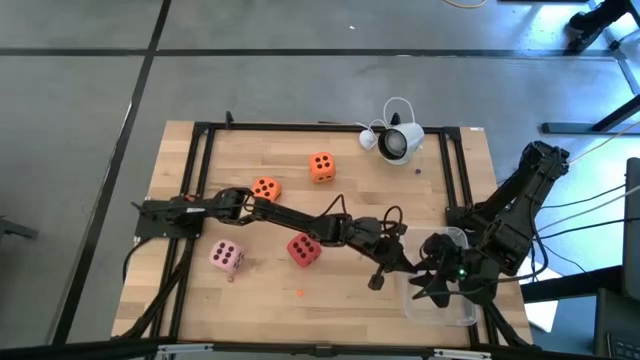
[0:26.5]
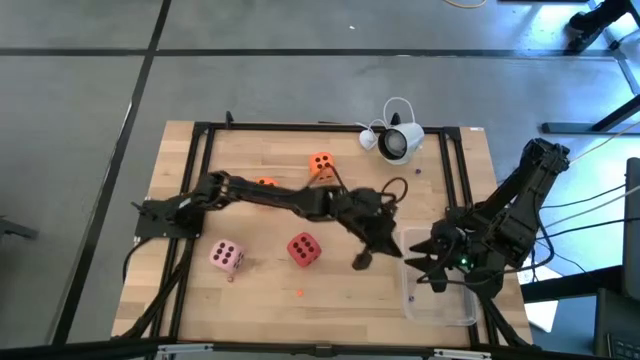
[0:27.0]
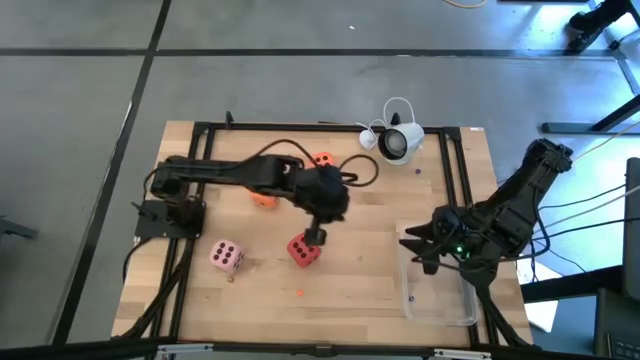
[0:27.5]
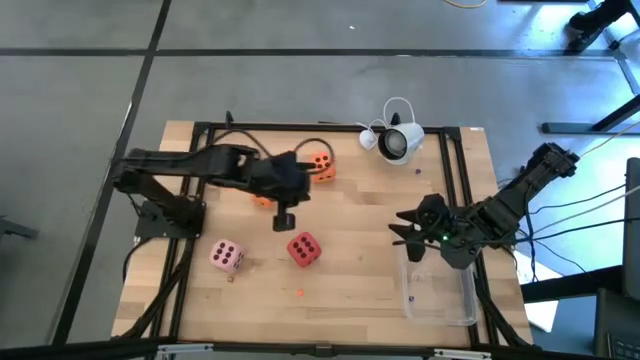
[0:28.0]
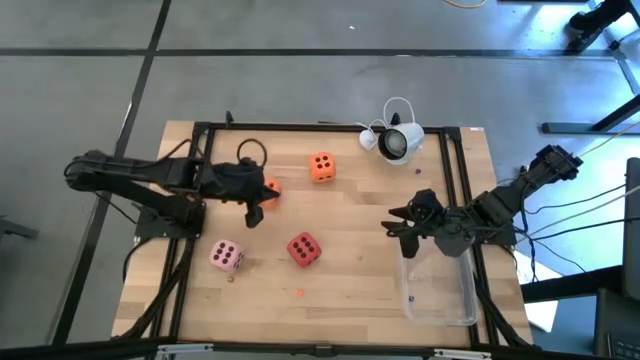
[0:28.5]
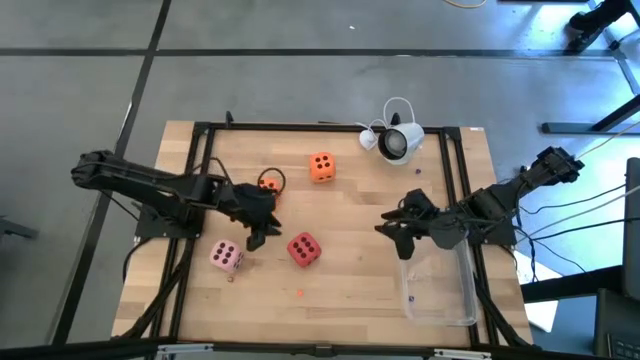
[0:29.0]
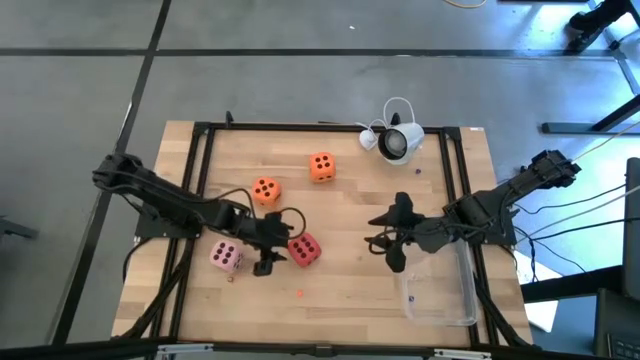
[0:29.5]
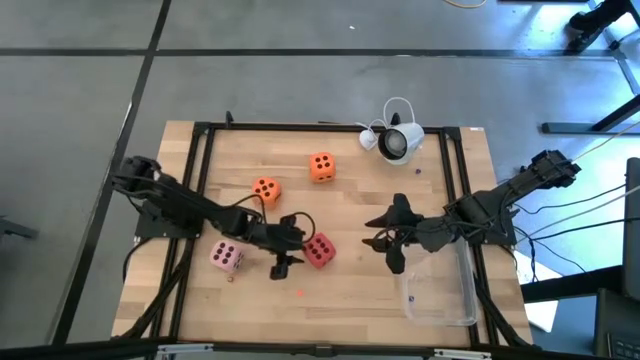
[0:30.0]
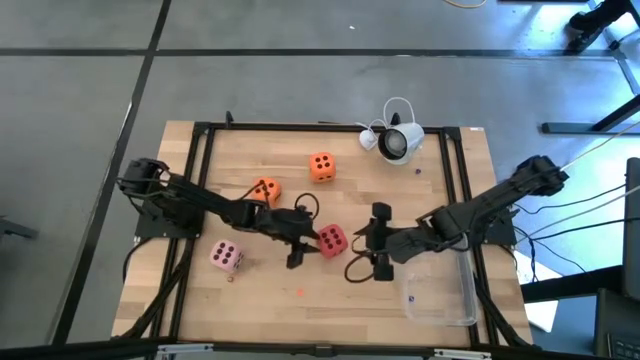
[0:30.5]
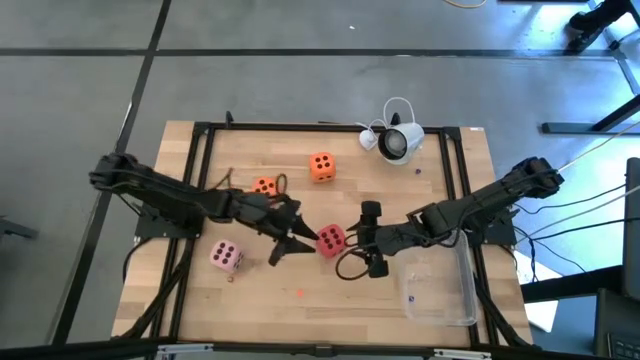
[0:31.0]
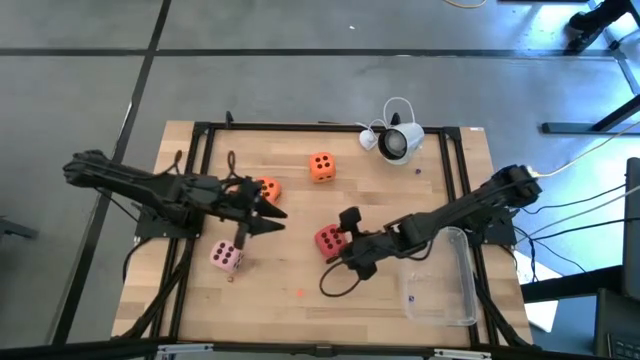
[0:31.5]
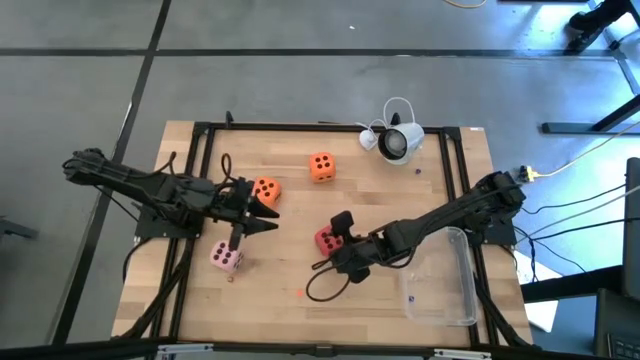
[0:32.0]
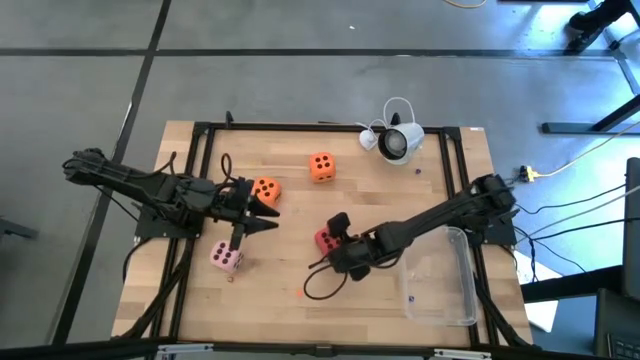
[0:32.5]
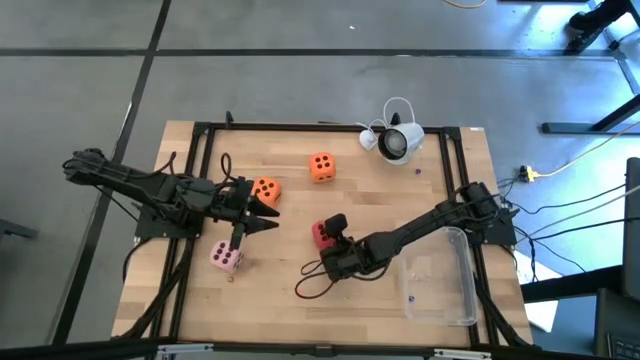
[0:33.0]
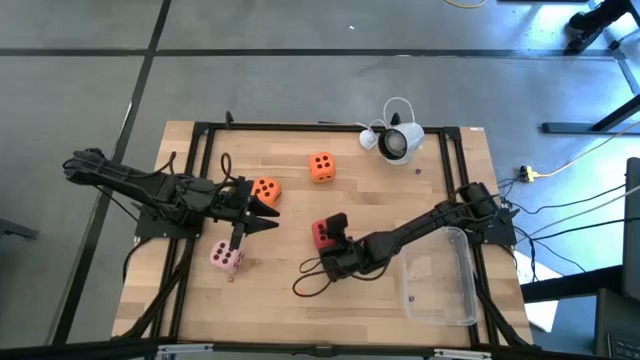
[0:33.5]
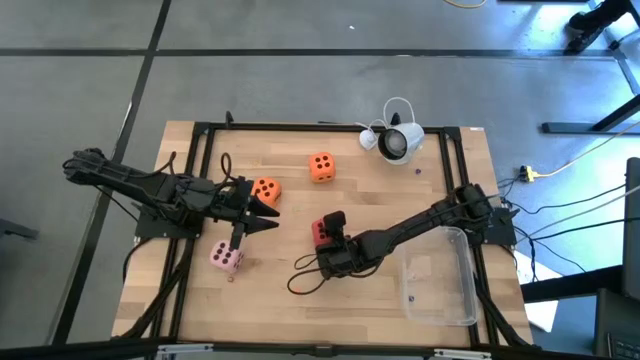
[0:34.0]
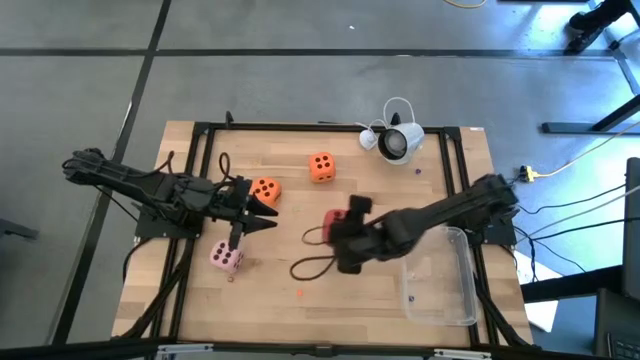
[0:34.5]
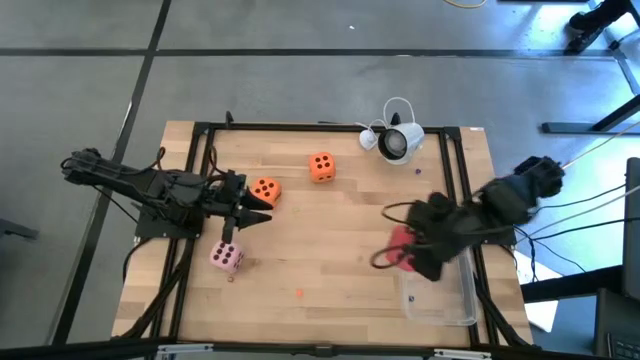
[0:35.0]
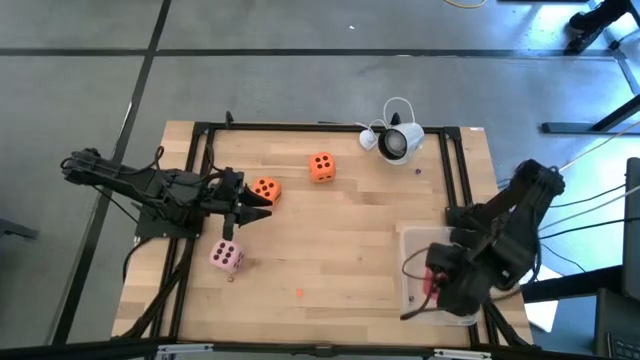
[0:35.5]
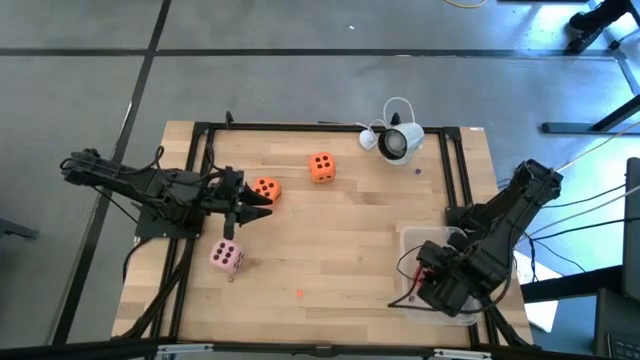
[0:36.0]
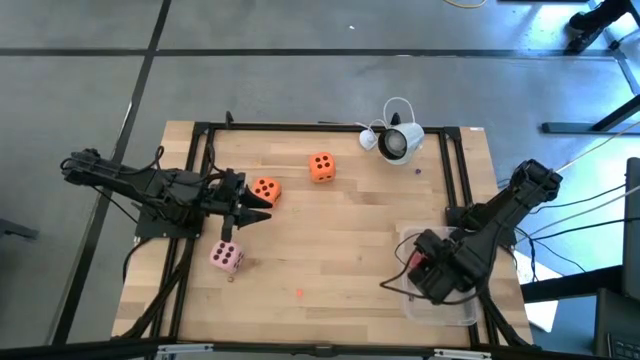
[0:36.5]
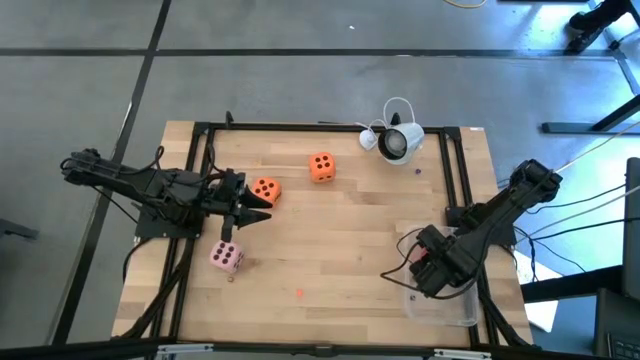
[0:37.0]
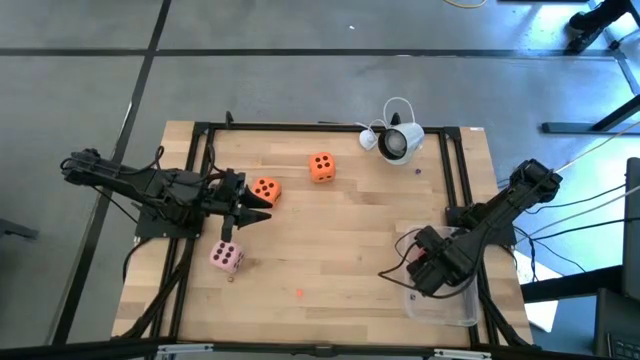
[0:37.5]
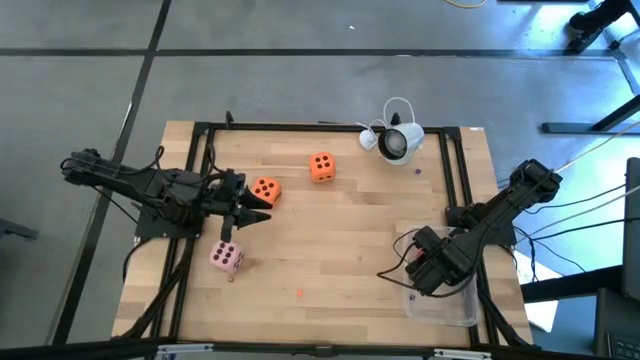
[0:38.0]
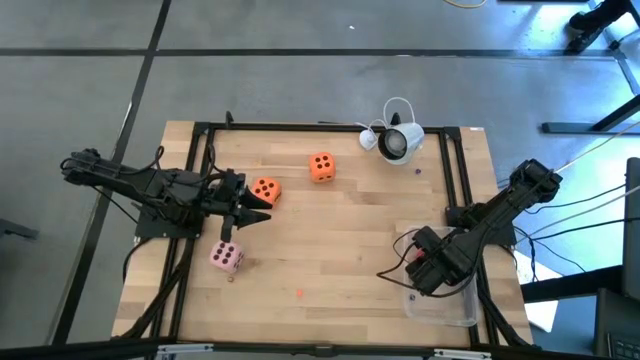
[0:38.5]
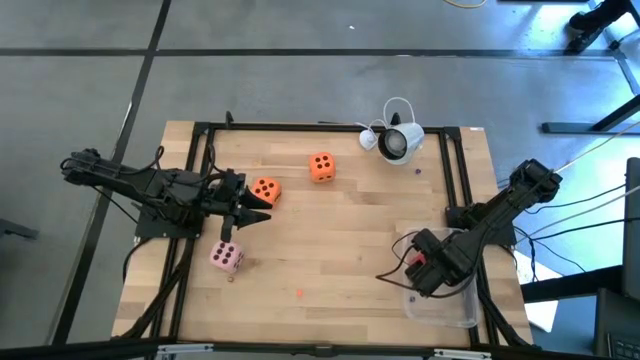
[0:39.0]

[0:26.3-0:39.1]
Task: Pick & Place Dice
Put the large red die into the transparent bin

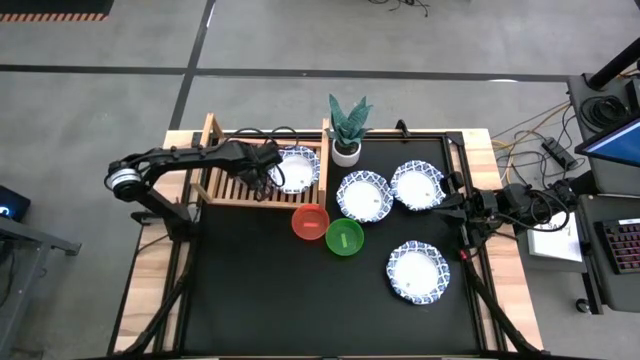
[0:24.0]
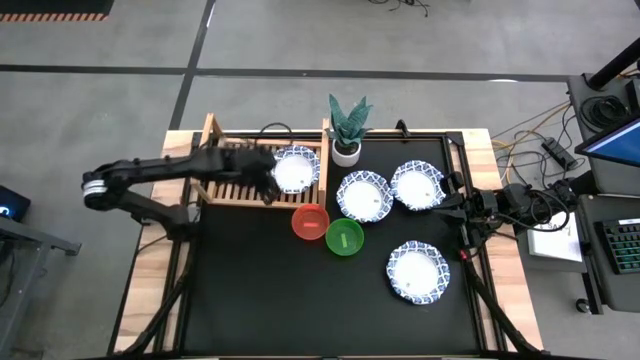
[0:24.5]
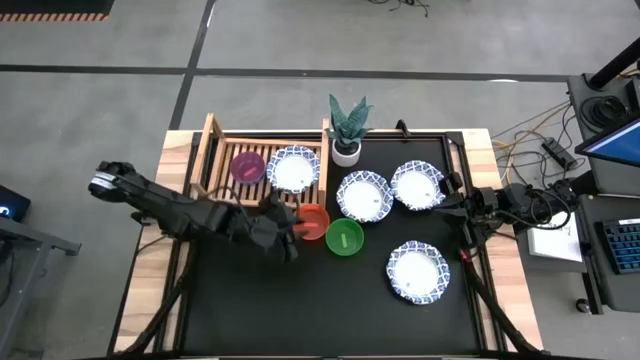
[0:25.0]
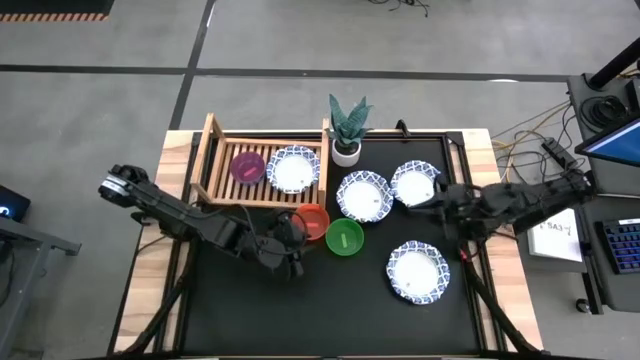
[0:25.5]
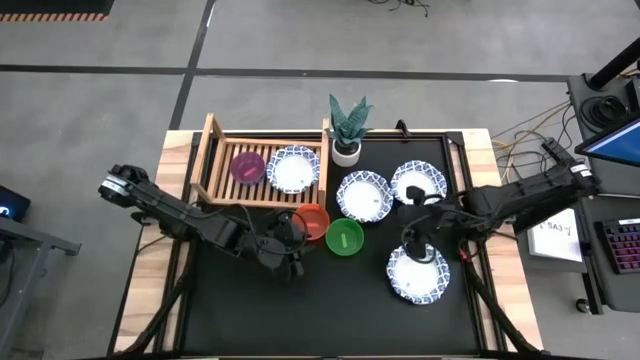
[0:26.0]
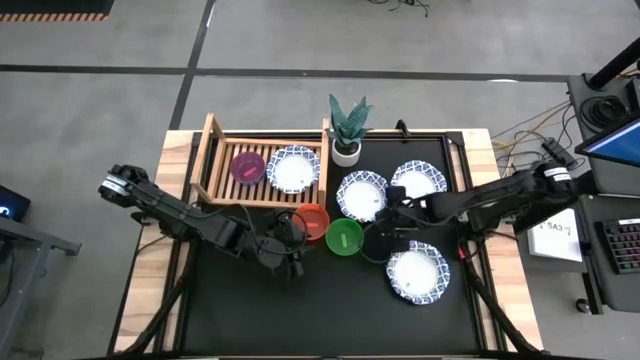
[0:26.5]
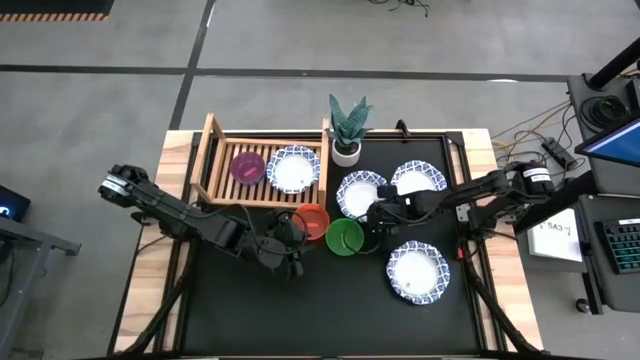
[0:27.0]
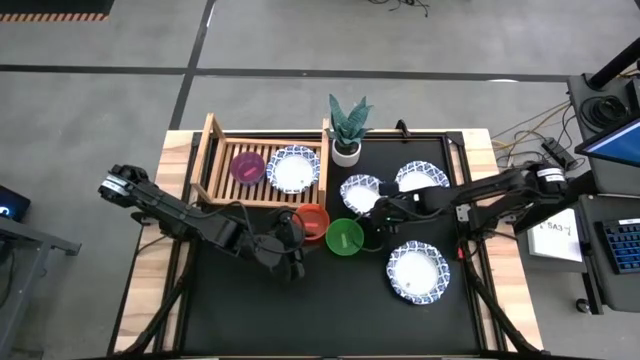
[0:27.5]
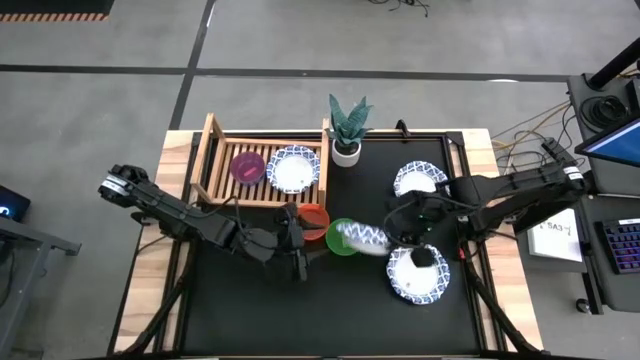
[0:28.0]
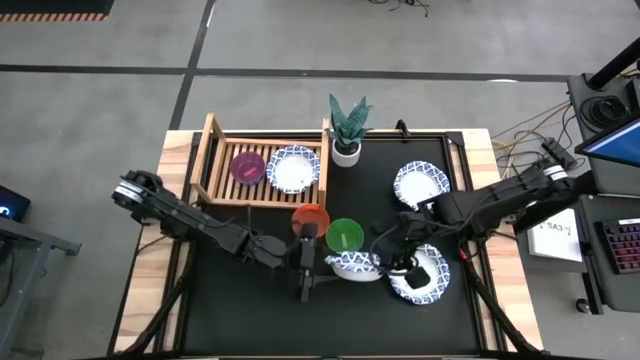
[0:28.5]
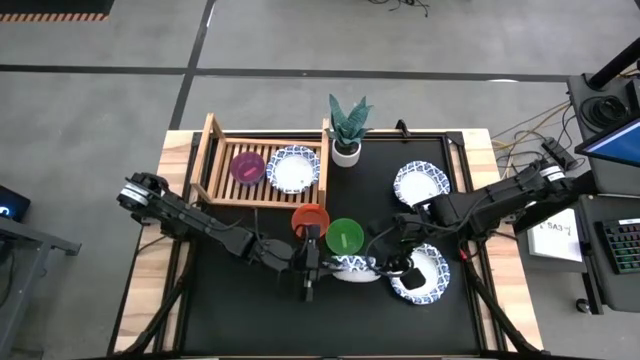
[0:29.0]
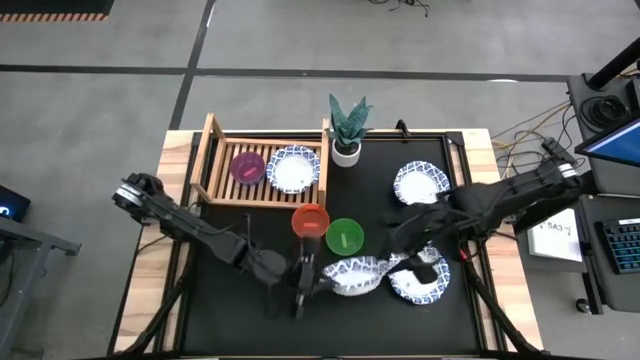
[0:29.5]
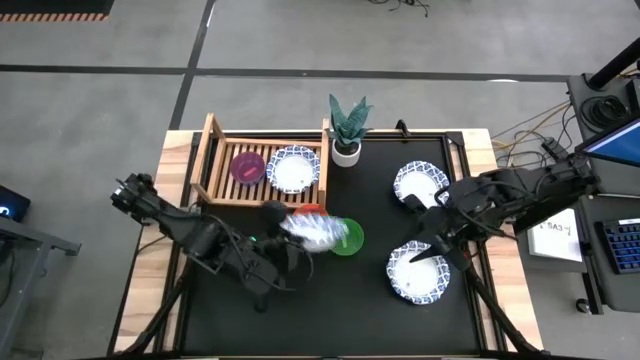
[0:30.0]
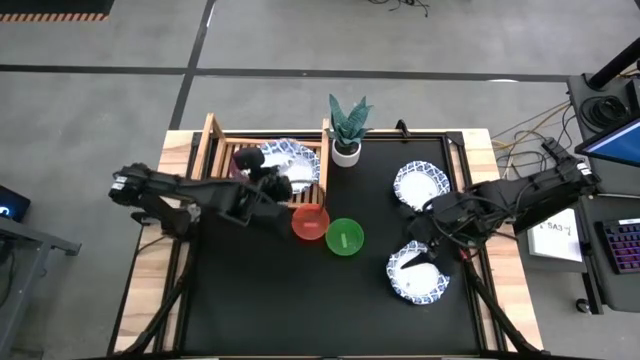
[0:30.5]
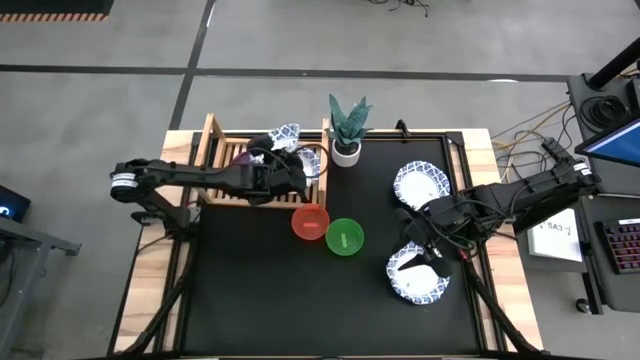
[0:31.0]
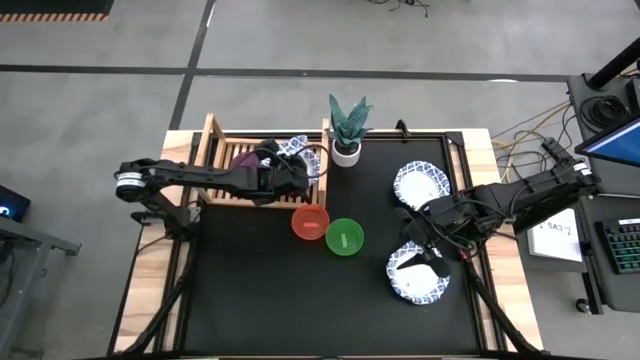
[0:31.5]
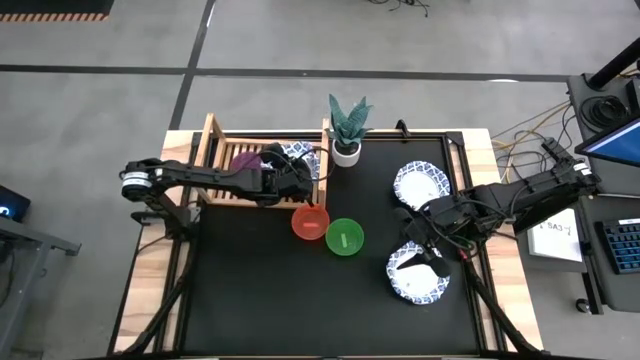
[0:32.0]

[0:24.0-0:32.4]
Task: Place and stack bowls onto a shelf
Stack the blue patterned bowl on top of the blue patterned bowl on the shelf

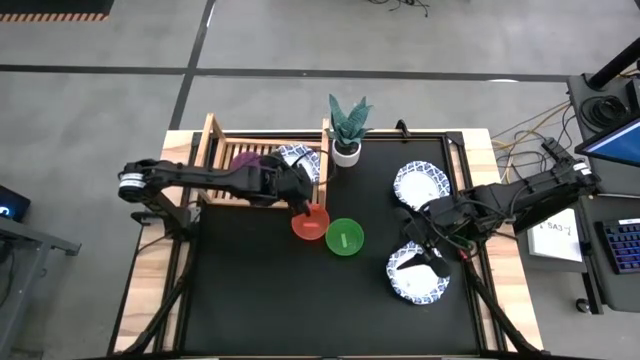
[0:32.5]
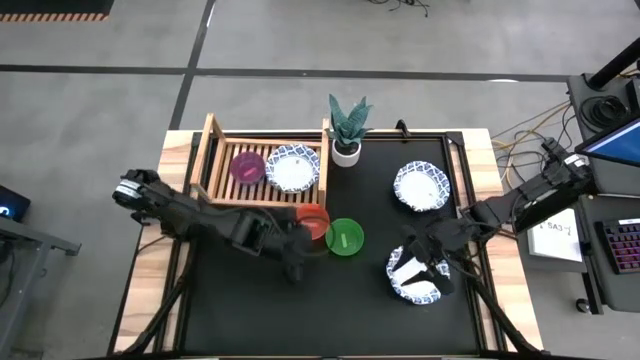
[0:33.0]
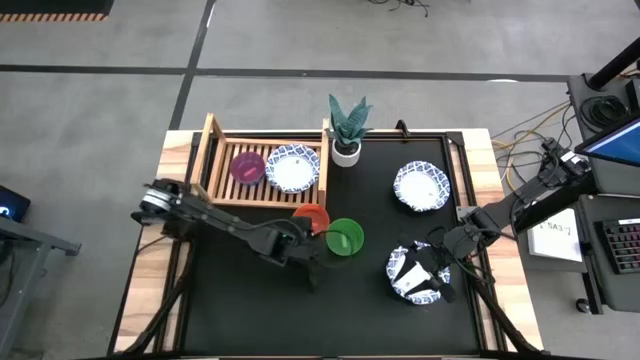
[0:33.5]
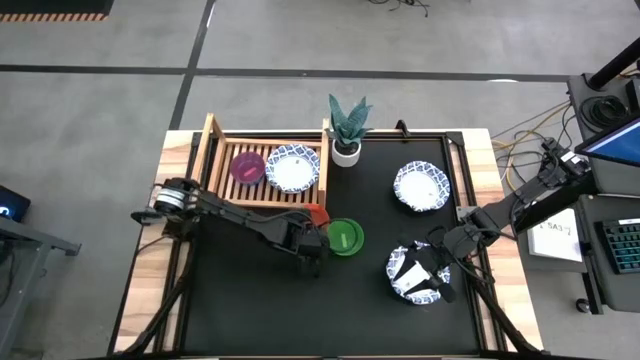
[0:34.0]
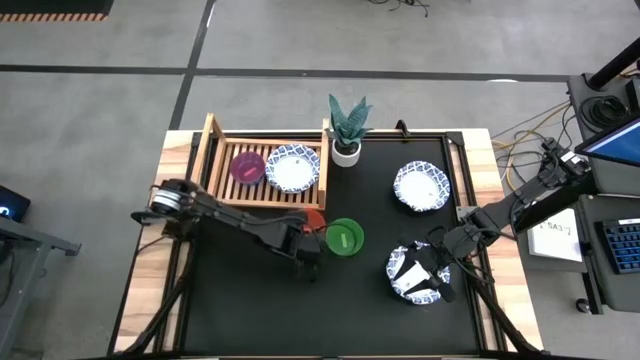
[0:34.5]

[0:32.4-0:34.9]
Stack the orange bowl on top of the pink bowl on the shelf
